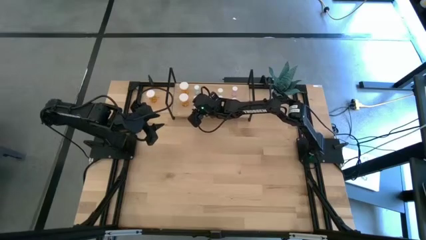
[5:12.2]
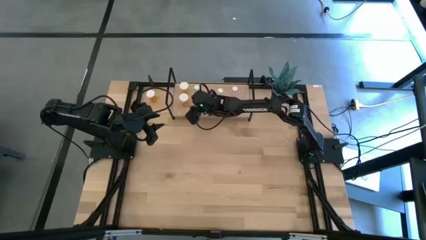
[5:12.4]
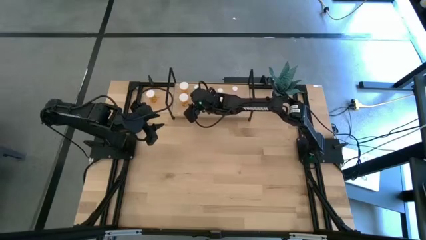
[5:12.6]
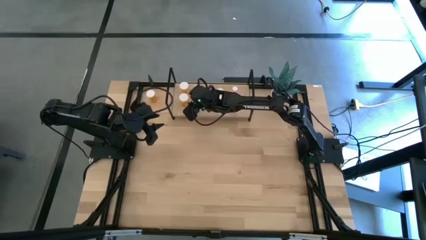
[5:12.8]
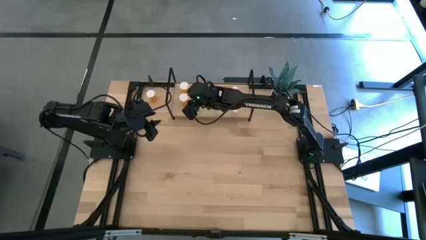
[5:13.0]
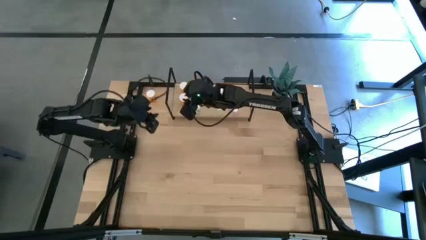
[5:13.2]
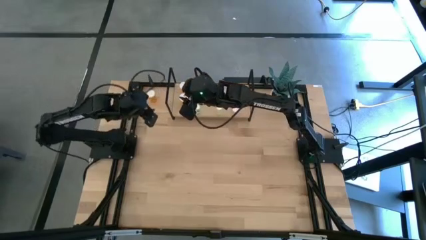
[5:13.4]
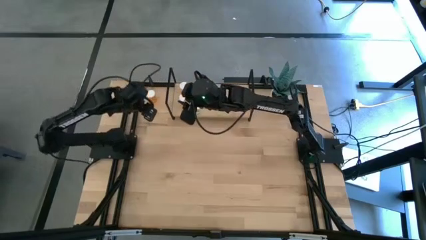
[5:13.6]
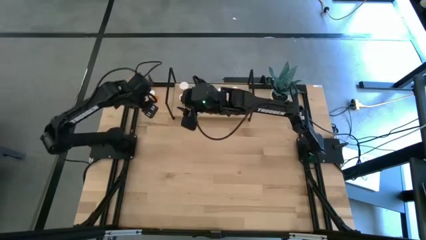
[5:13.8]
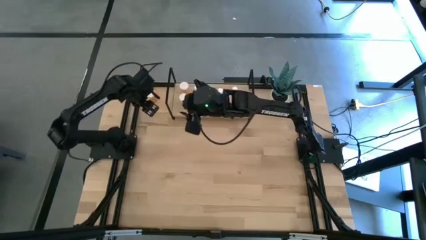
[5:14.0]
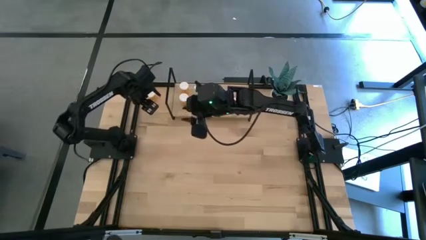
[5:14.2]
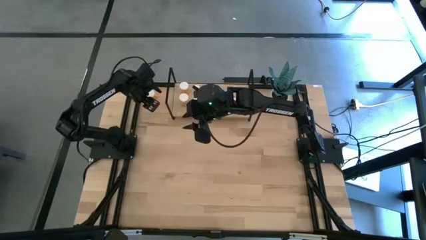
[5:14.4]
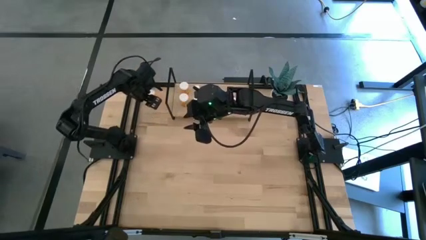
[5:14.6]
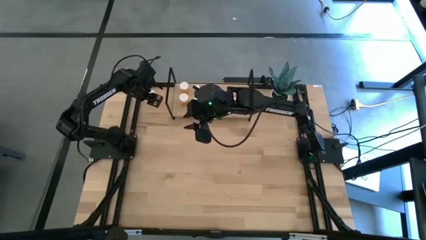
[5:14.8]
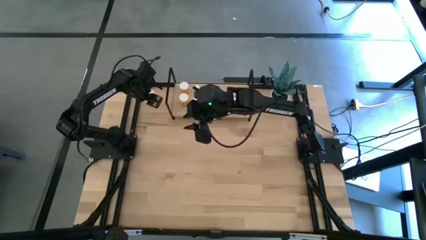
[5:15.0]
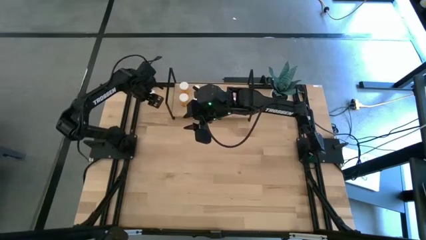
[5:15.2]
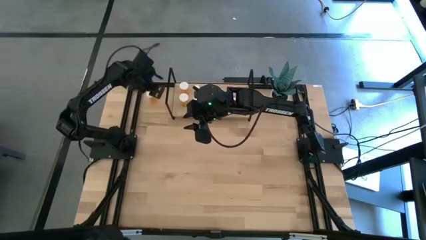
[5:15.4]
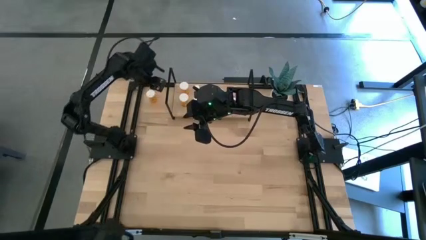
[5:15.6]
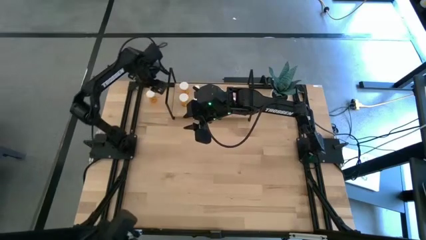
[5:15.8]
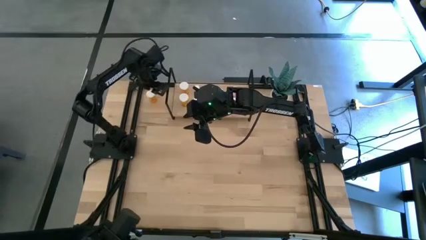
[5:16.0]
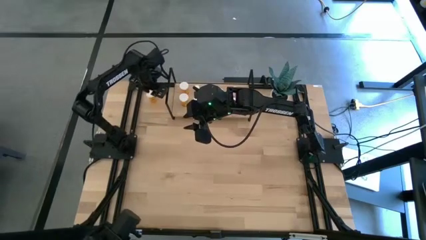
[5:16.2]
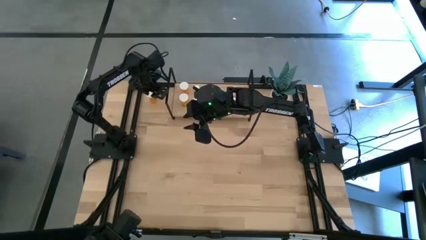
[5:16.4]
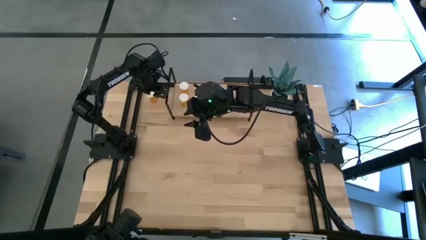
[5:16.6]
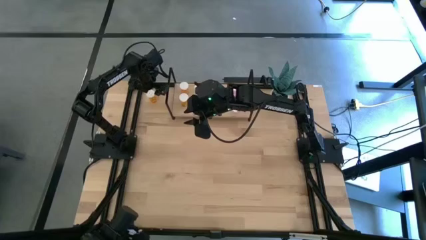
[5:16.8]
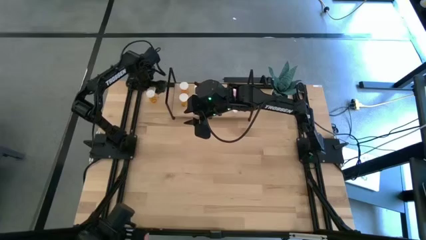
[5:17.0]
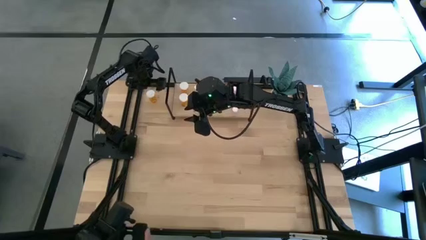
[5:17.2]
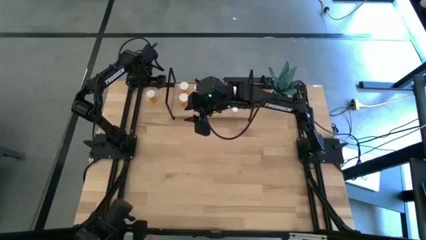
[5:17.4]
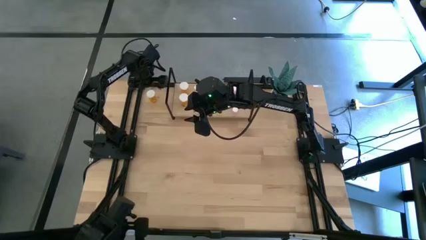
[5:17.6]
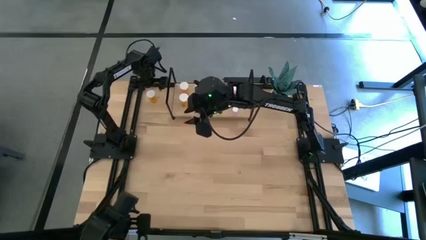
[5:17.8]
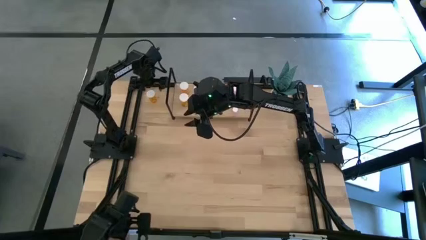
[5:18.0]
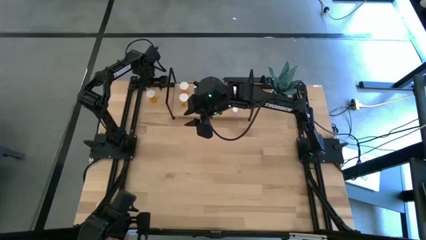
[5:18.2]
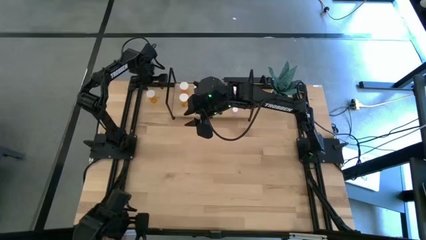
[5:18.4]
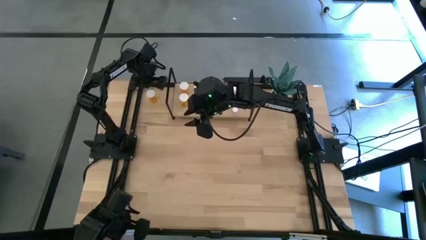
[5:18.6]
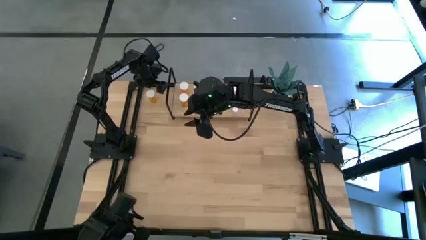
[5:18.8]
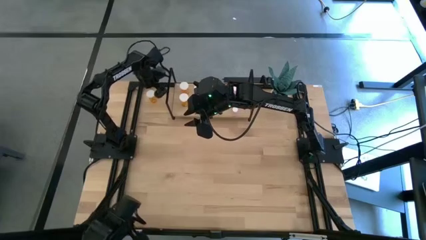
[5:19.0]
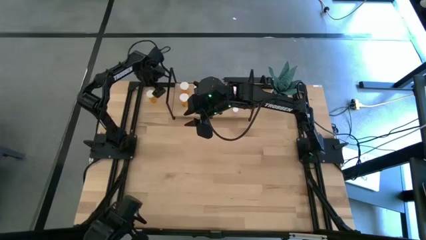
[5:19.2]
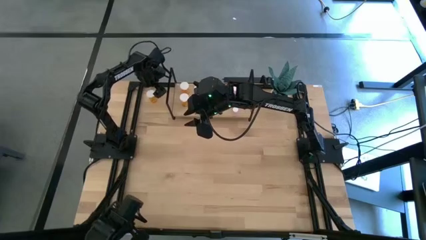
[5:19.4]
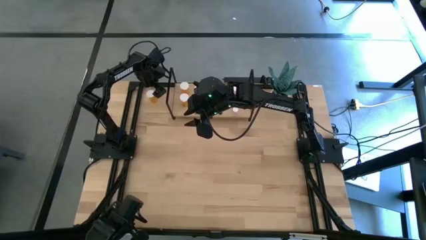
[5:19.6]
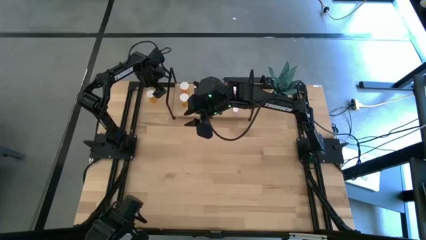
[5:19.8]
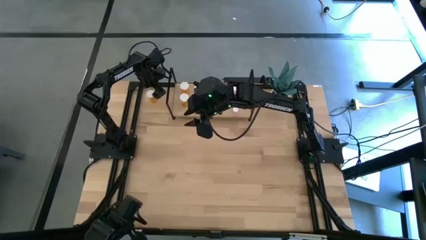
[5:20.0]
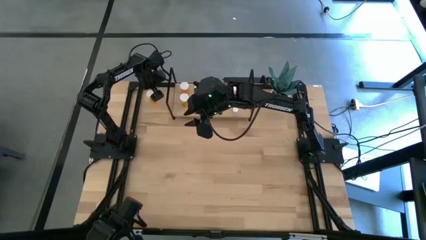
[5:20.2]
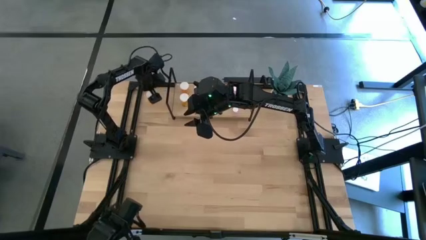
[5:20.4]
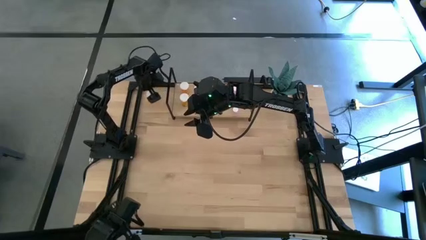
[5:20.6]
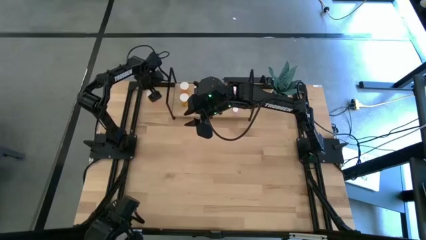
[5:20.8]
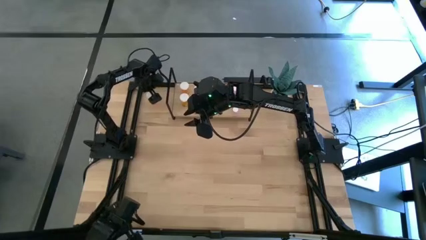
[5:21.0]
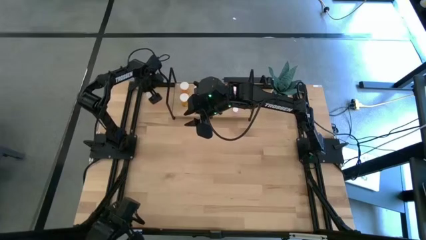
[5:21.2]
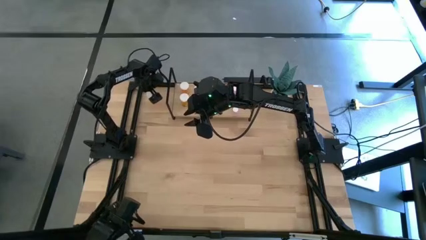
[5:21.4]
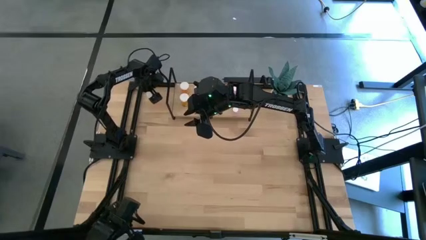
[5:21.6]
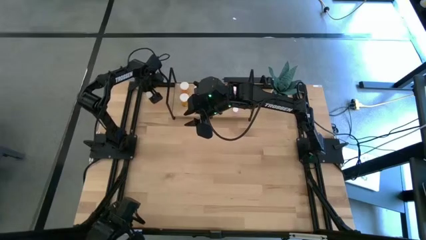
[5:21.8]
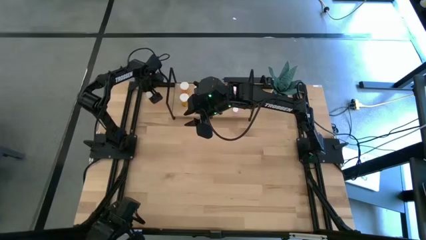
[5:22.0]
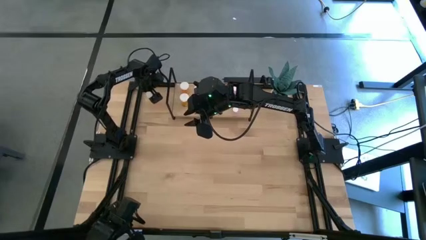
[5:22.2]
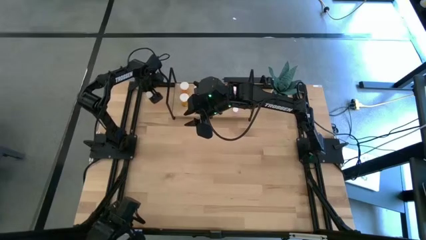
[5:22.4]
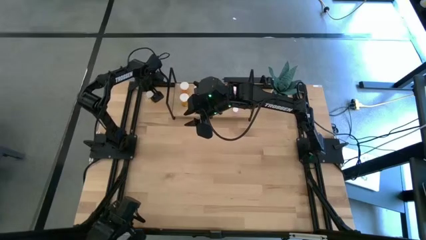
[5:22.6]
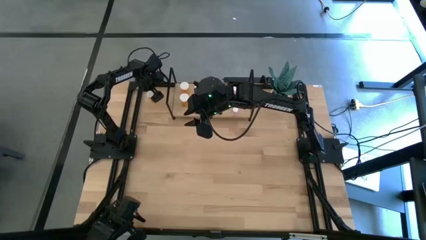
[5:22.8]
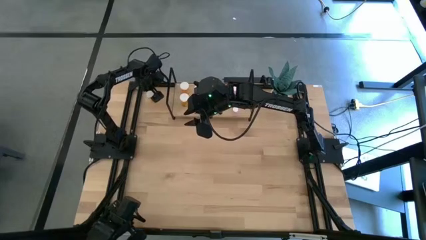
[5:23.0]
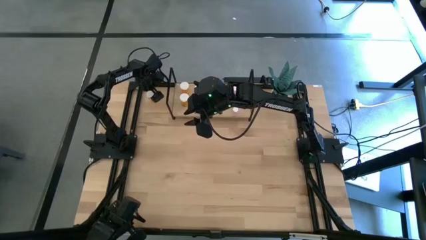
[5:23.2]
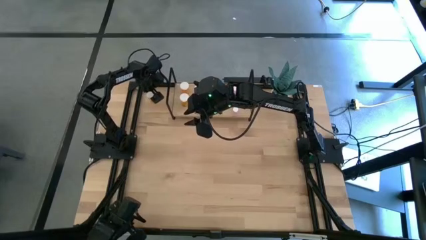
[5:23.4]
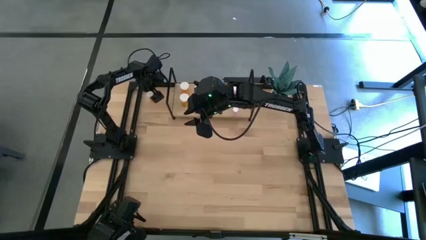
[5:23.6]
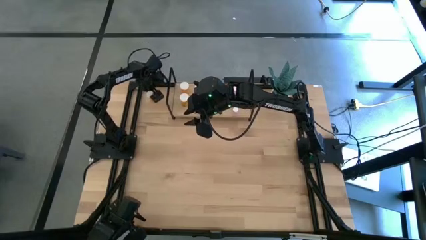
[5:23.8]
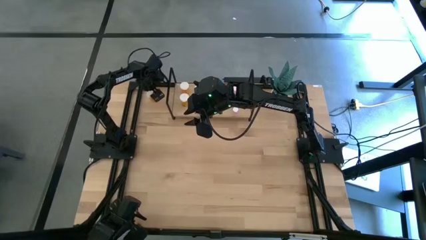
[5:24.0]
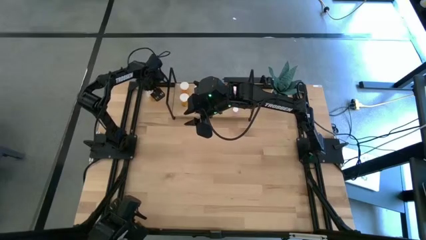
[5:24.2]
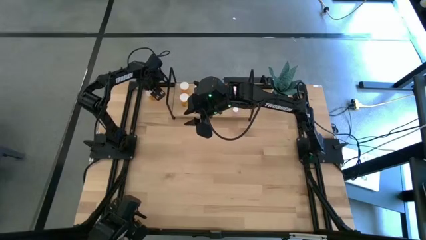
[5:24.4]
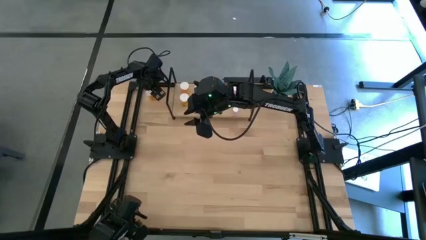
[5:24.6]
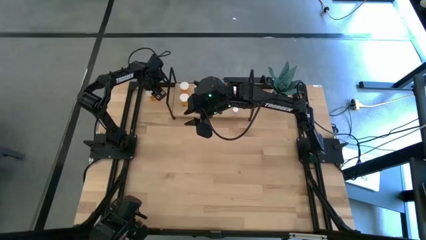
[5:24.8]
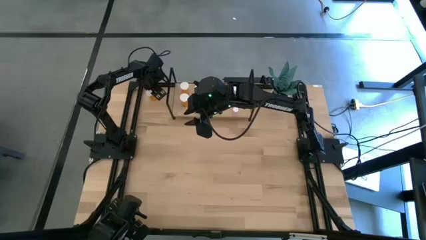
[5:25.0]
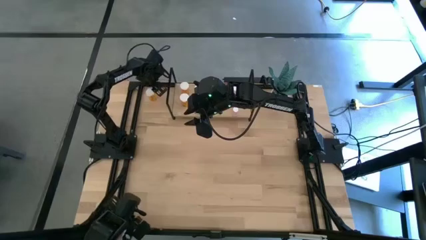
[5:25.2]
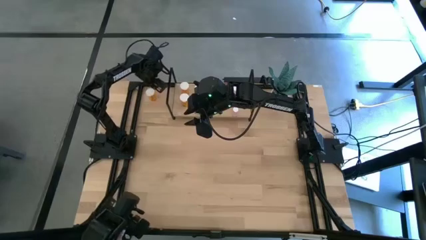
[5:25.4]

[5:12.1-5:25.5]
Task: Pick and place medicine bottles onto shelf by color
Put the orange pill bottle on the shelf aligned with the other orange pill bottles
